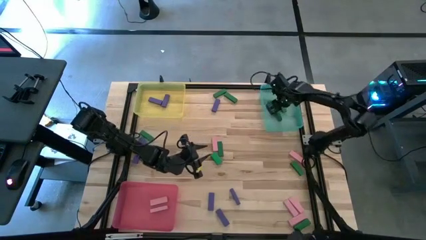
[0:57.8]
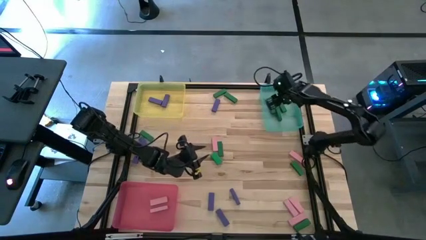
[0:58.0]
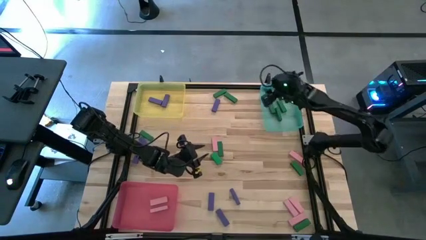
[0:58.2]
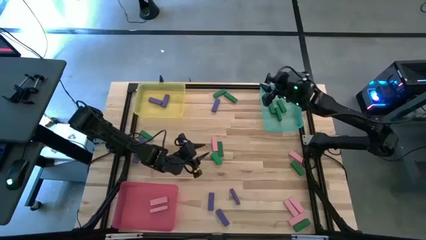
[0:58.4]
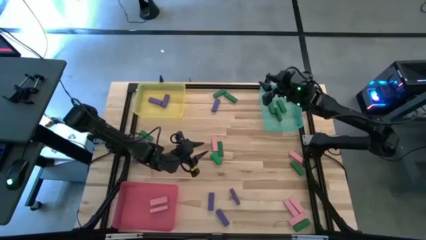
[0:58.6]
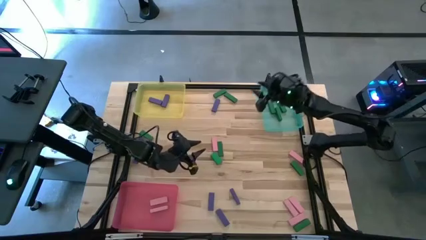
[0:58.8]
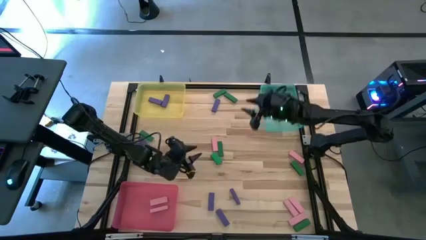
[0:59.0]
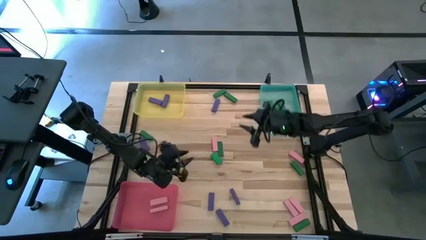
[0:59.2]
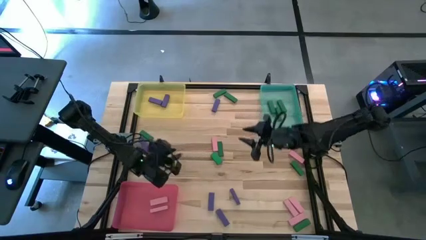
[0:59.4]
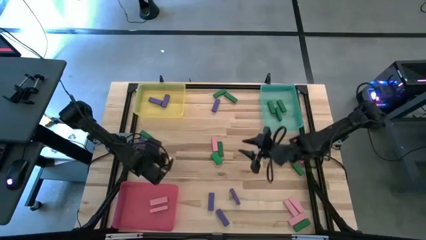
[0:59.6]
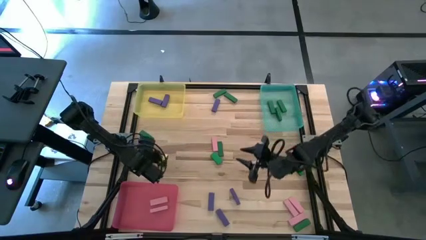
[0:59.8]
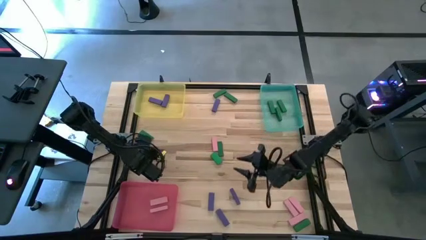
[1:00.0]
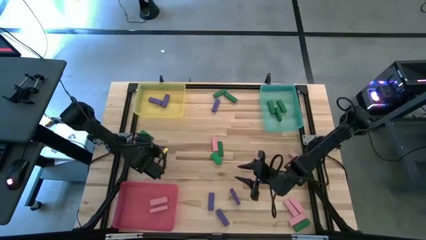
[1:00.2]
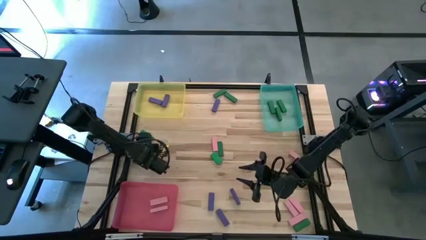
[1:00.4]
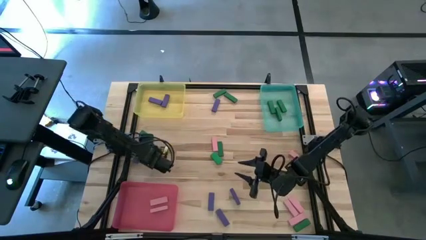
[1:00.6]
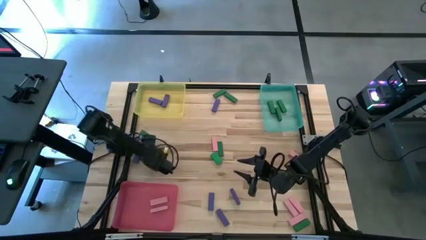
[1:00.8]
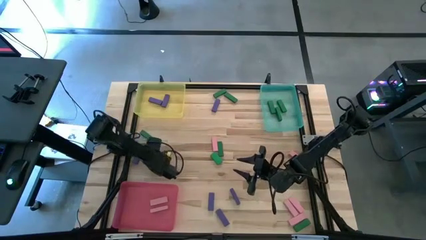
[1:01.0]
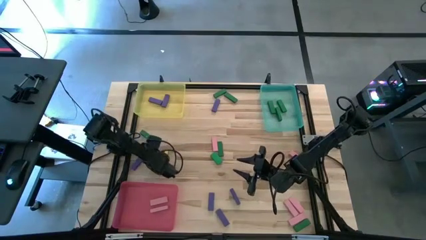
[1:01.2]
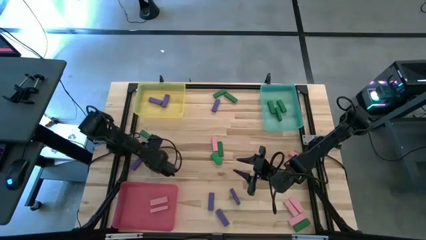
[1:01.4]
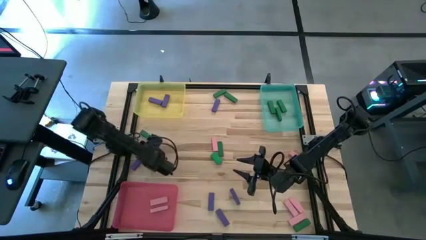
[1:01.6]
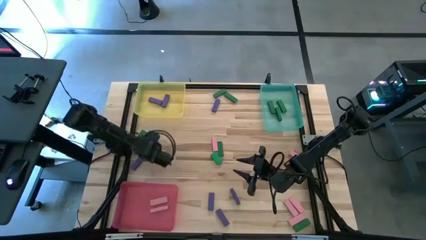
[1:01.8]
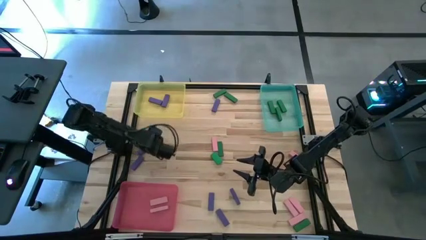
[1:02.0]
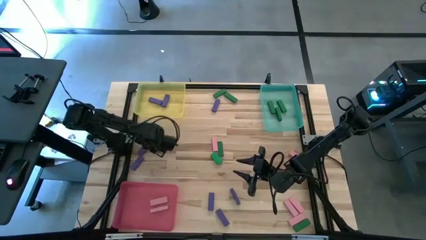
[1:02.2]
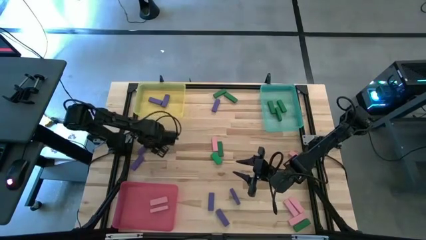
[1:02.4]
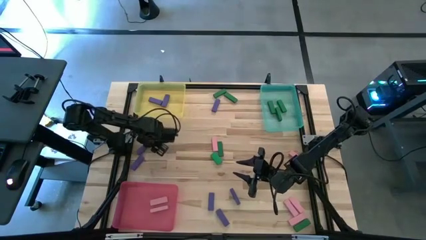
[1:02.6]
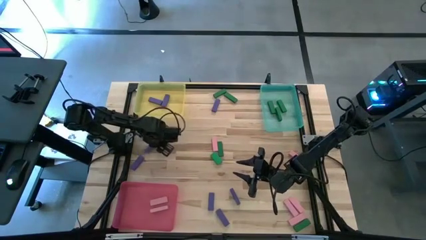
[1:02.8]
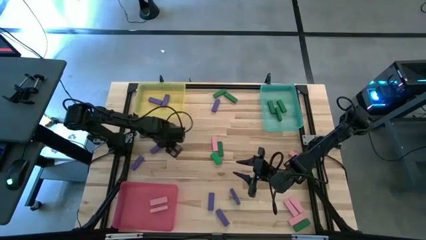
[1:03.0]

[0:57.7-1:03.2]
Task: Sort blocks
Put the purple wooden block into the yellow bin

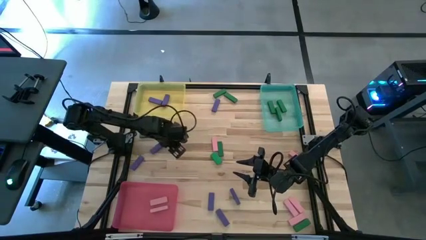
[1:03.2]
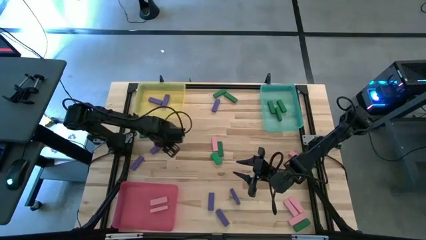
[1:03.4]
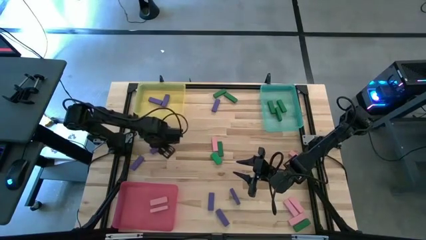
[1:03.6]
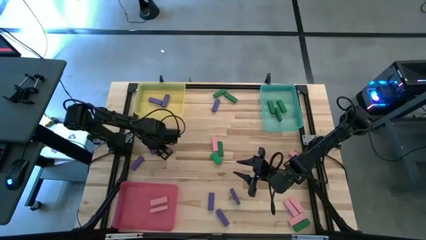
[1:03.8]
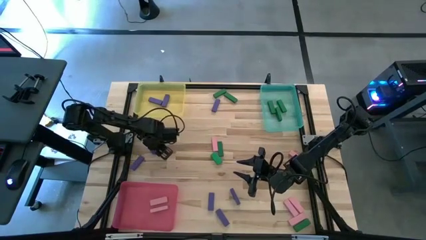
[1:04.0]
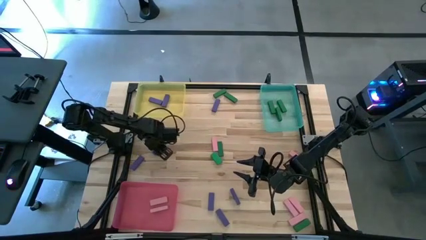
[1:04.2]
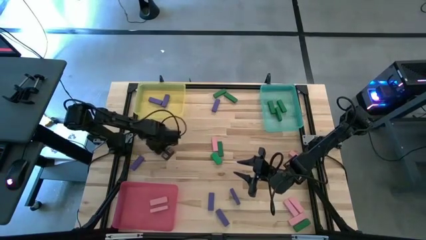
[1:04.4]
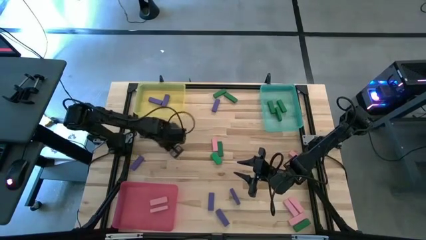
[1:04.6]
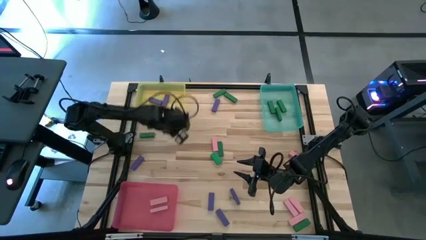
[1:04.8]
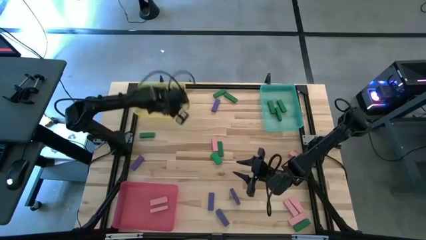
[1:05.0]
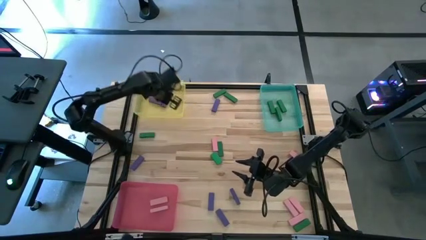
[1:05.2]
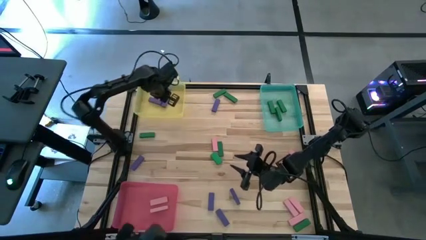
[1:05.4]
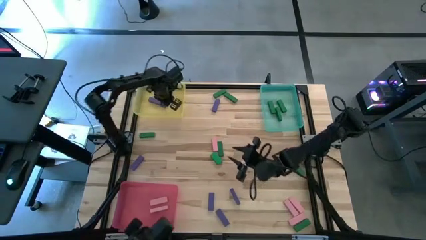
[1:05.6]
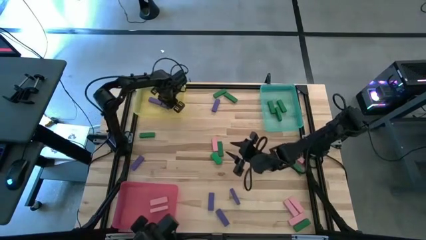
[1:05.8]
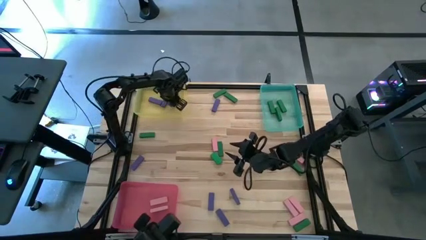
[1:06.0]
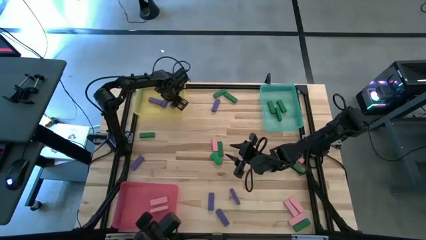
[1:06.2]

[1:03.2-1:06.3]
Put the purple wooden block into the yellow bin

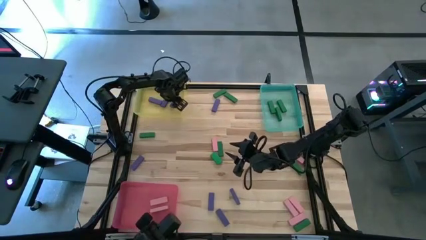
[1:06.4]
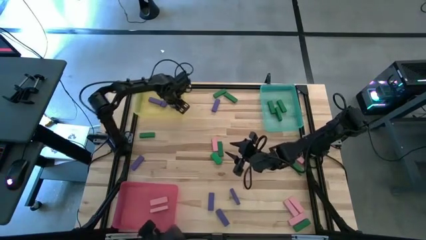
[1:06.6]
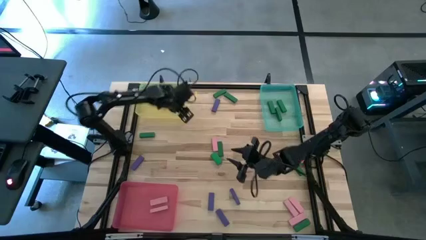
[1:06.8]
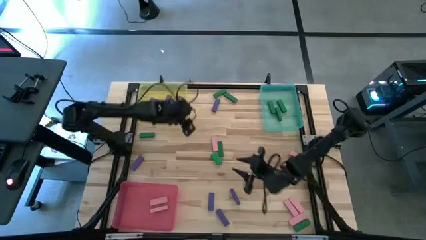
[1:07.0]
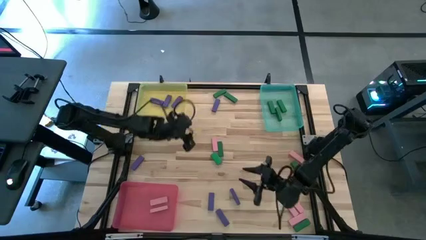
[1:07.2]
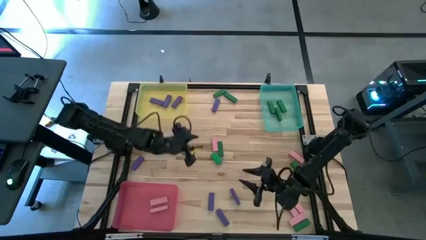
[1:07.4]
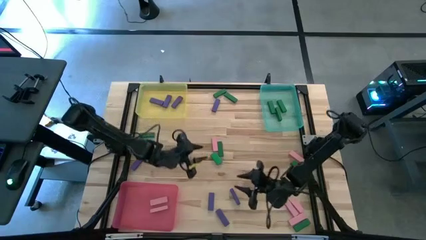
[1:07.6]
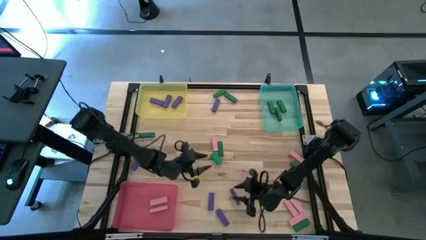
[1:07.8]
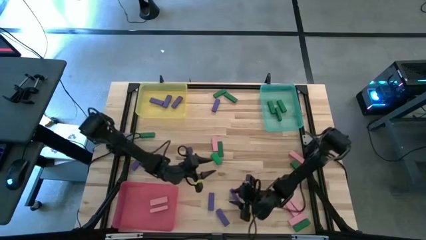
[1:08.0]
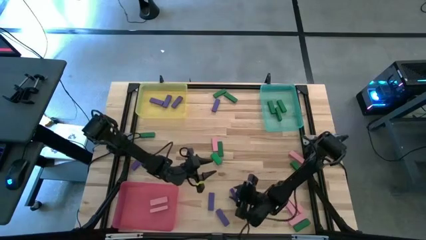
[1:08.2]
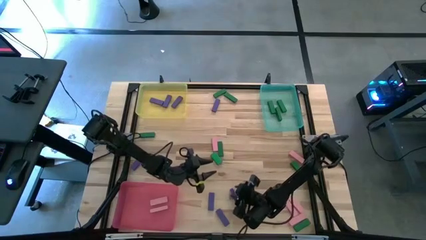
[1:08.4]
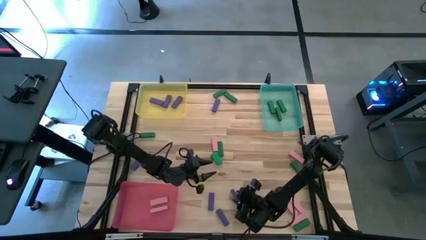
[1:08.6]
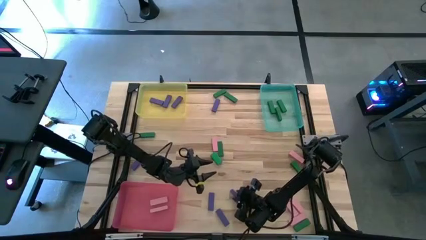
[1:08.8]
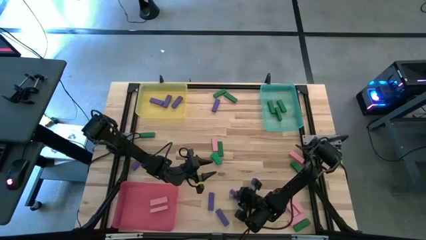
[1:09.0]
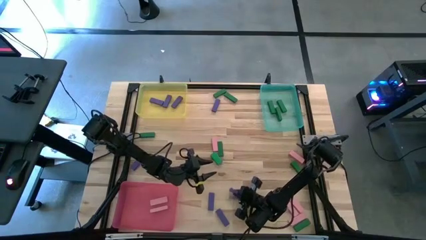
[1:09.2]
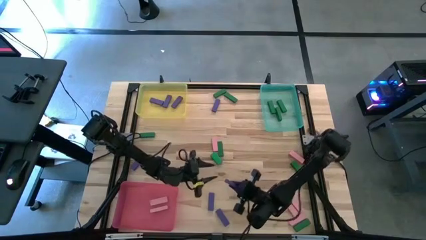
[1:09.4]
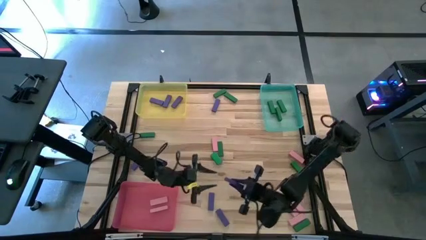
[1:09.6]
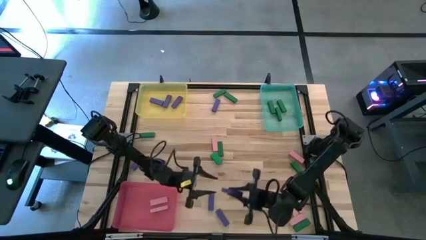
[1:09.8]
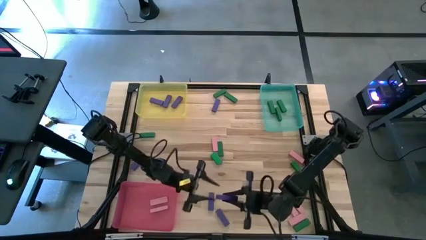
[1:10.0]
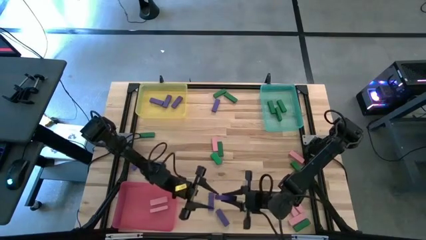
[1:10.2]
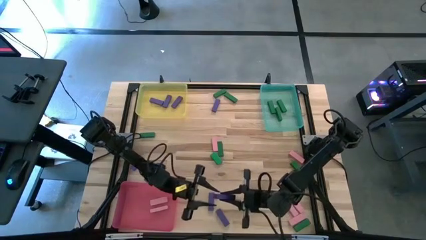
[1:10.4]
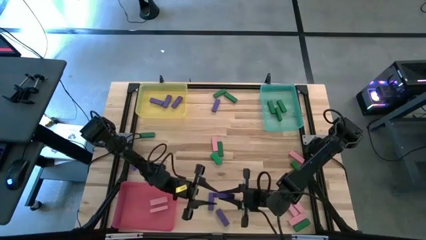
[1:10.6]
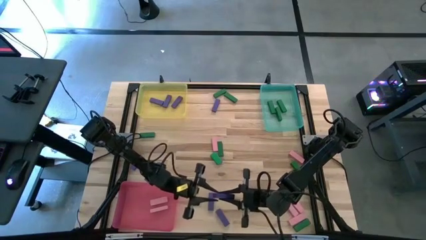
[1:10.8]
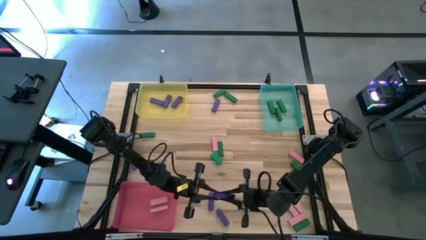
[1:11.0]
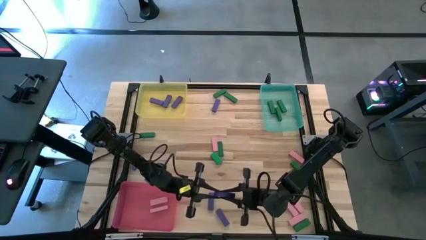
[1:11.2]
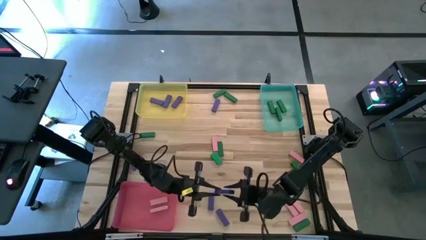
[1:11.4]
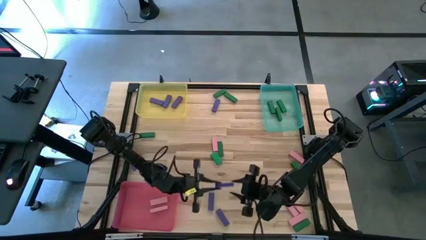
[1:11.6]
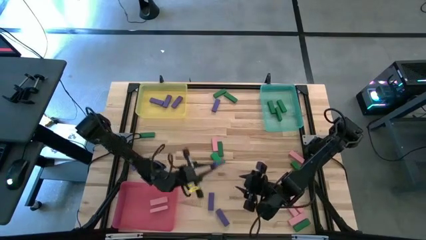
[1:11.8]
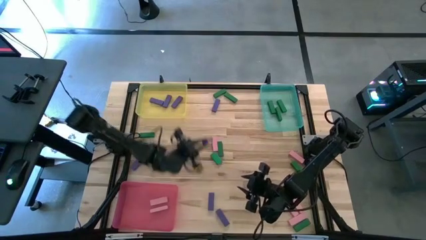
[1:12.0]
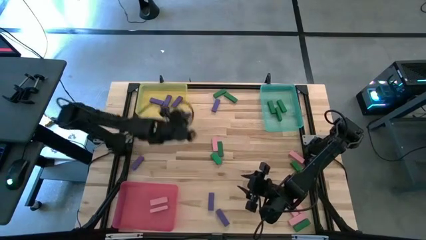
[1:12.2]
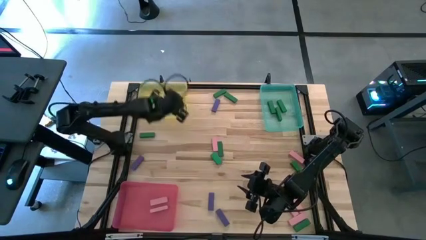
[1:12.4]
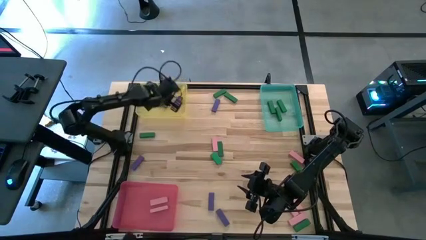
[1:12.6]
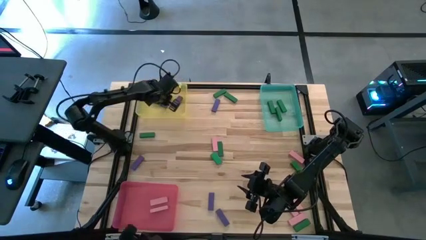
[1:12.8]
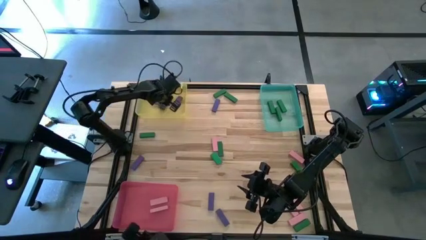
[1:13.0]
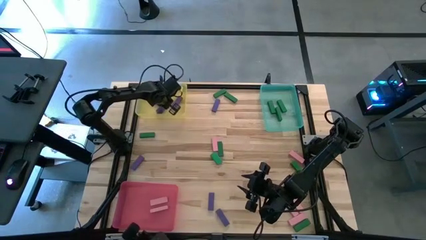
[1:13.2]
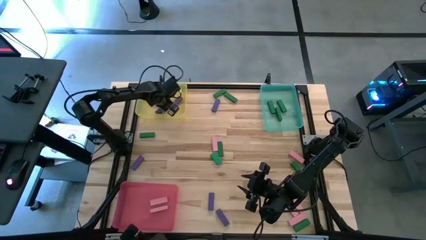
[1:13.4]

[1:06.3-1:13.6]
Put the purple wooden block into the yellow bin
